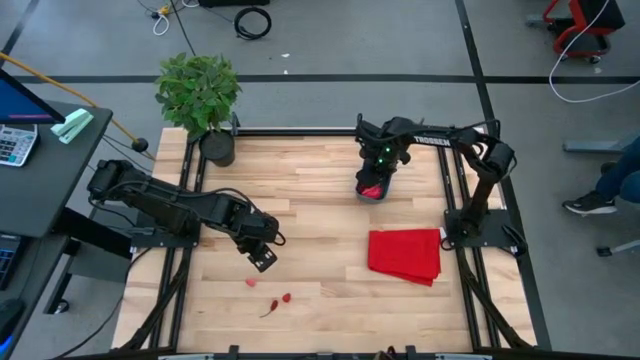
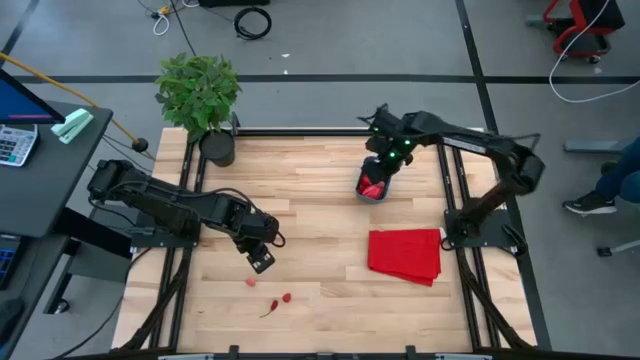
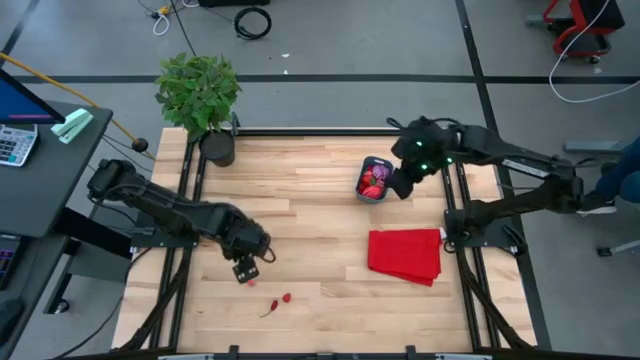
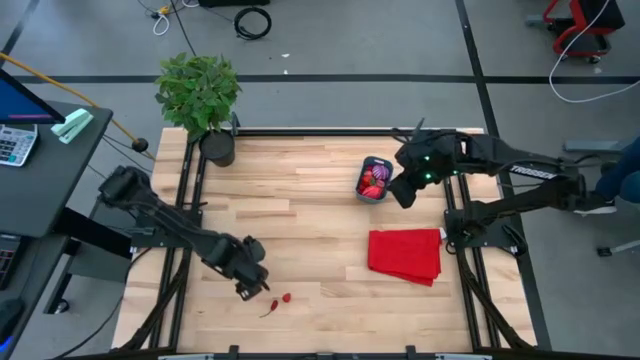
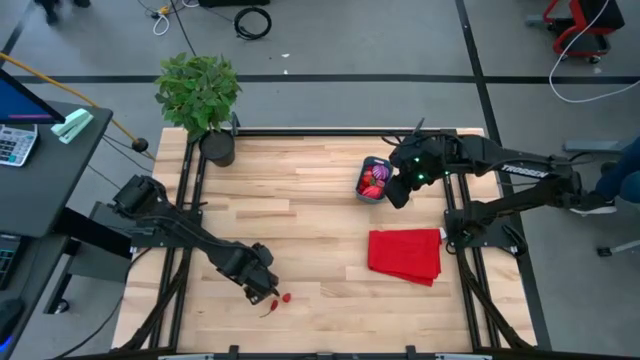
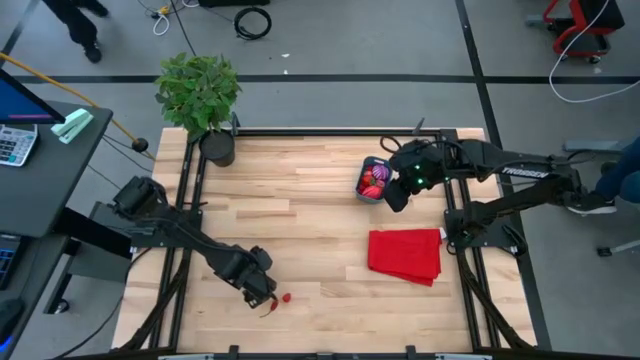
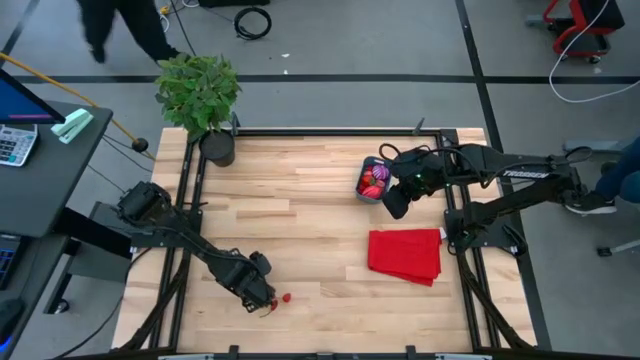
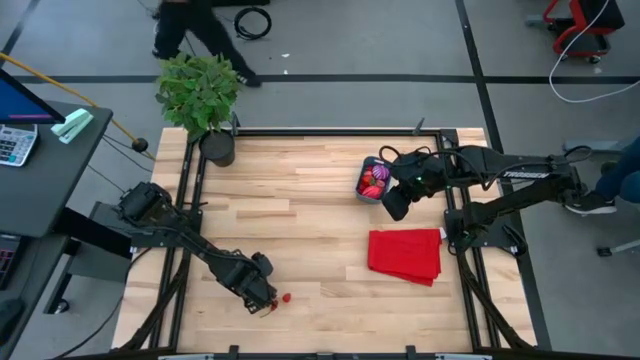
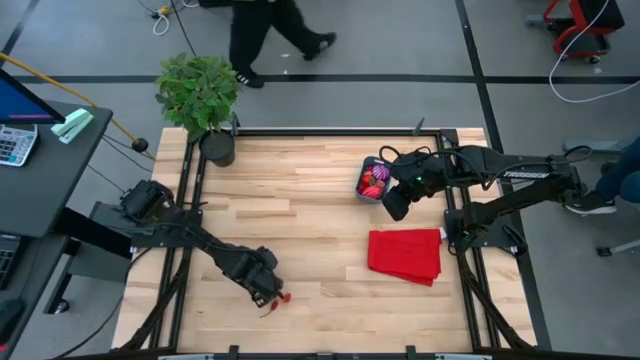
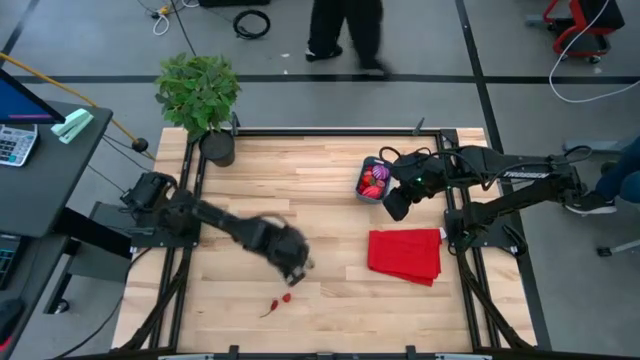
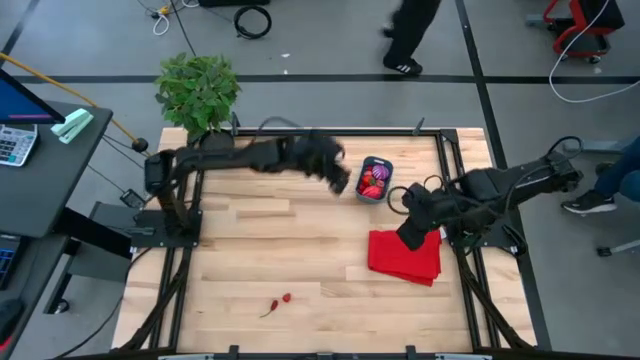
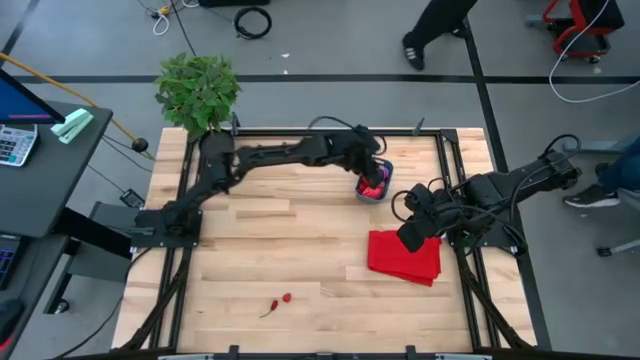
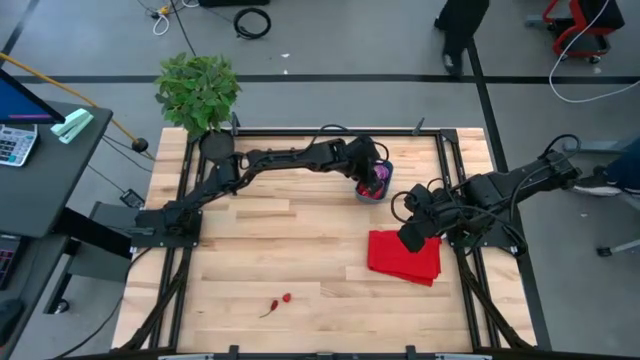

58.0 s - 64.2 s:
Task: Pick and placing Produce into tupperware
Put the peach into the bin

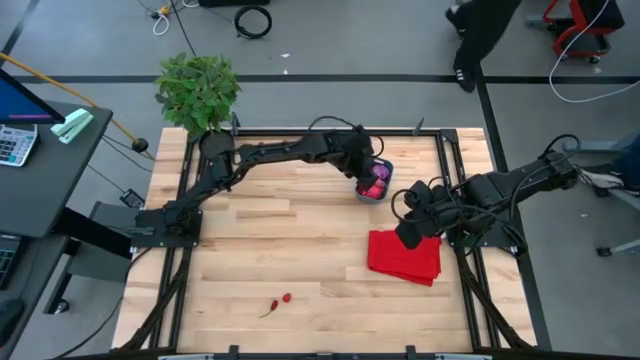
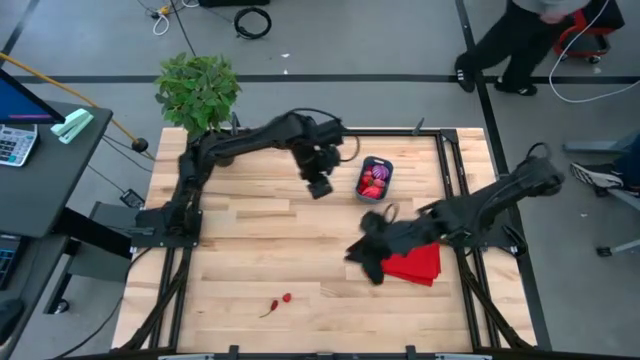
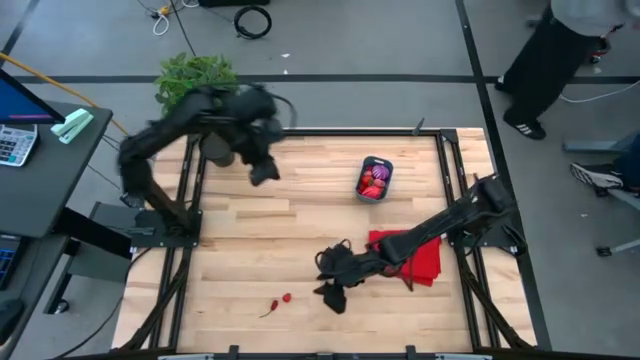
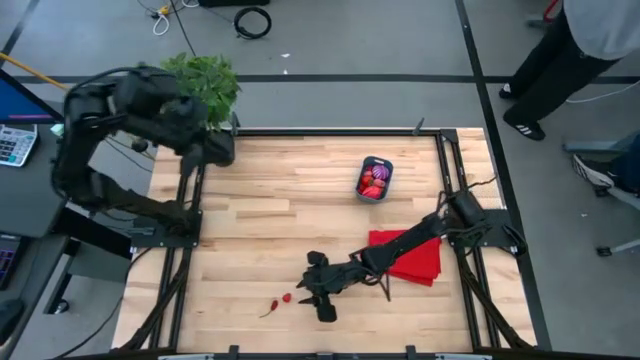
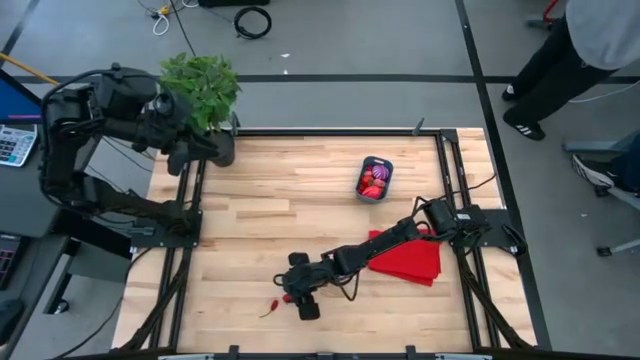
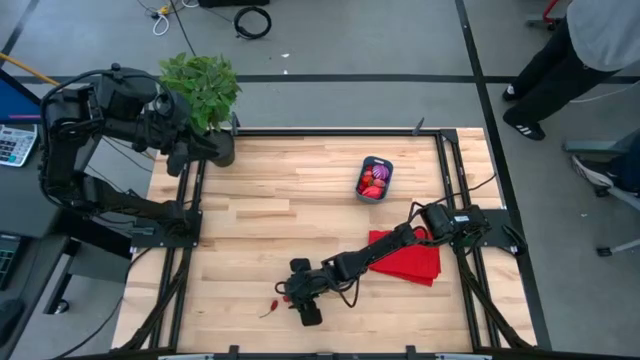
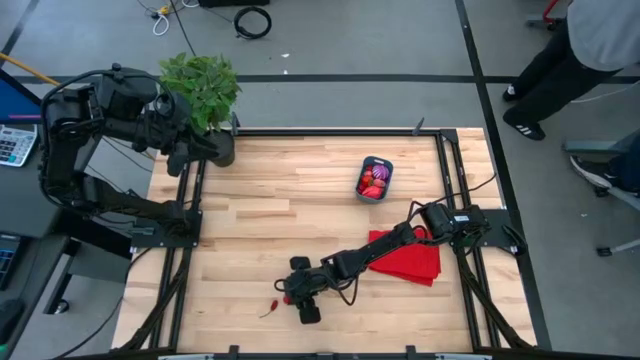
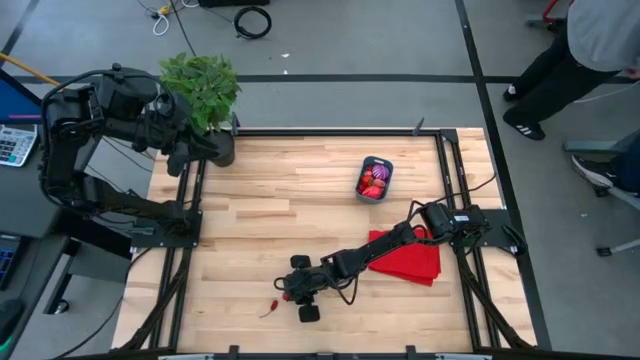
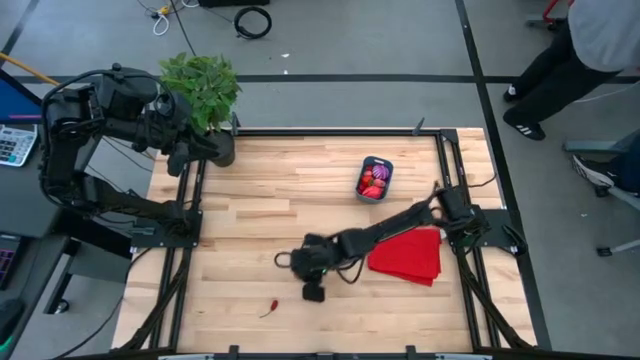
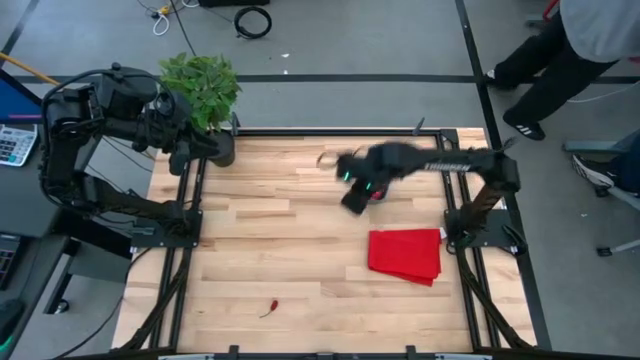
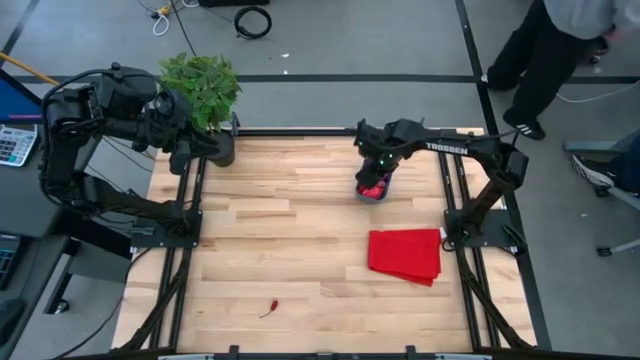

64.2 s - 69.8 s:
Put the strawberry into the bin

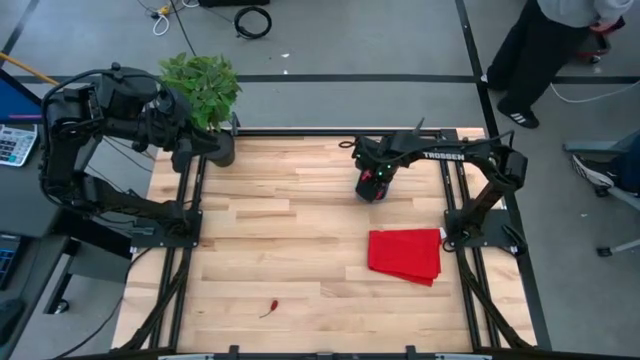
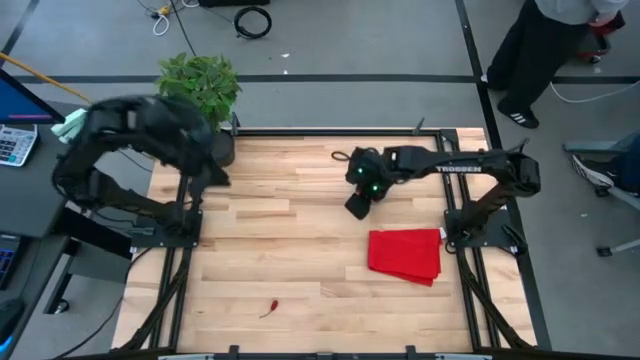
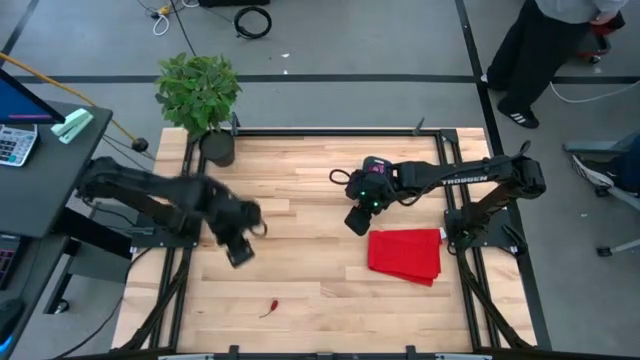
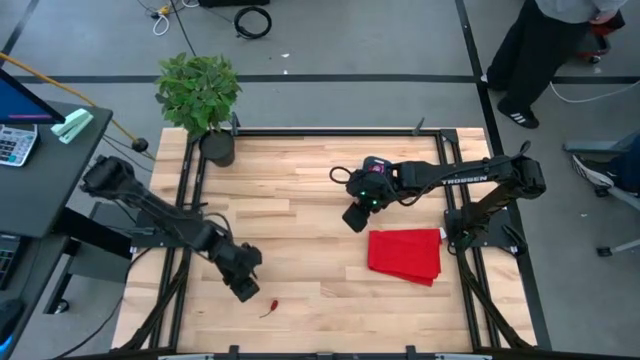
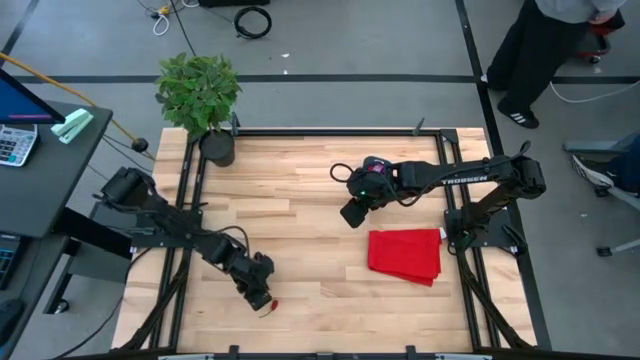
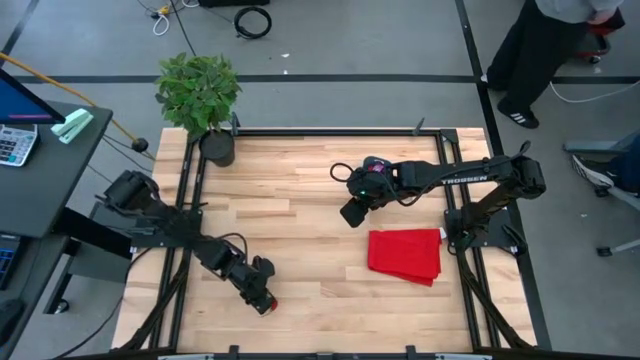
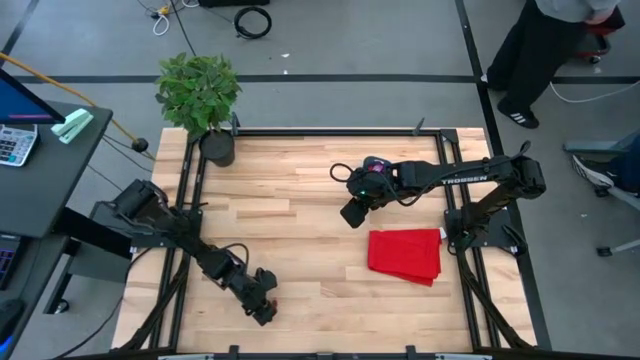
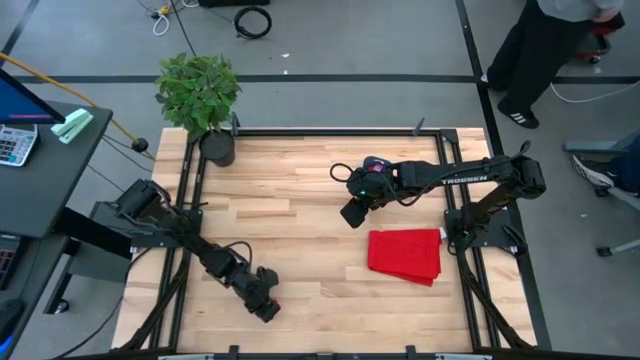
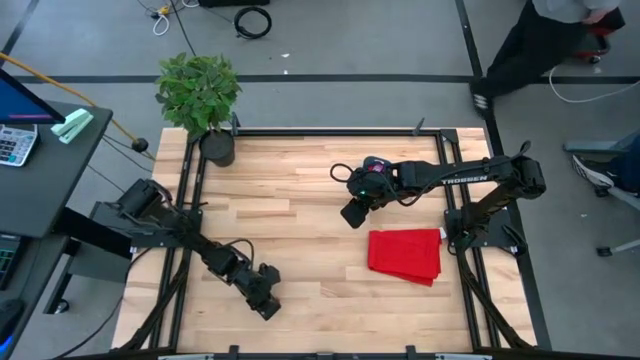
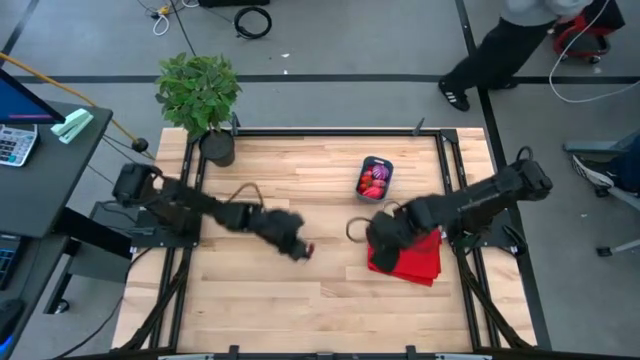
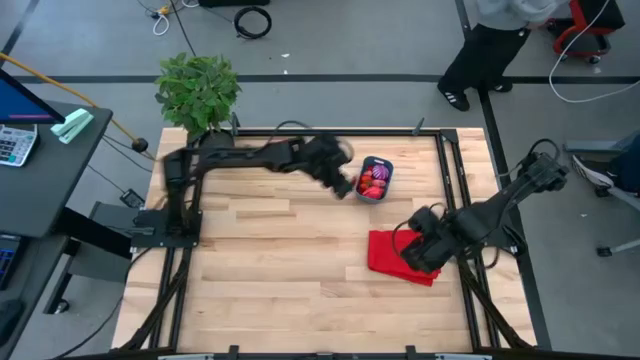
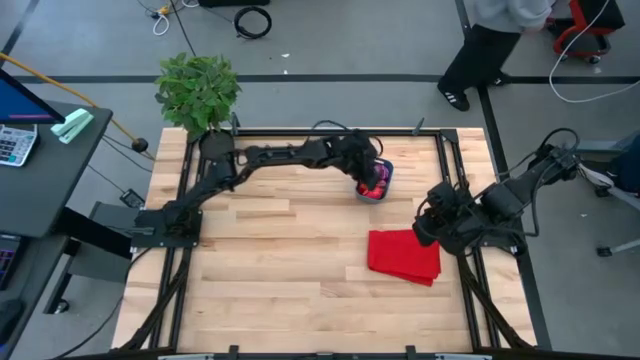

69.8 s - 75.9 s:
Put the berry into the bin

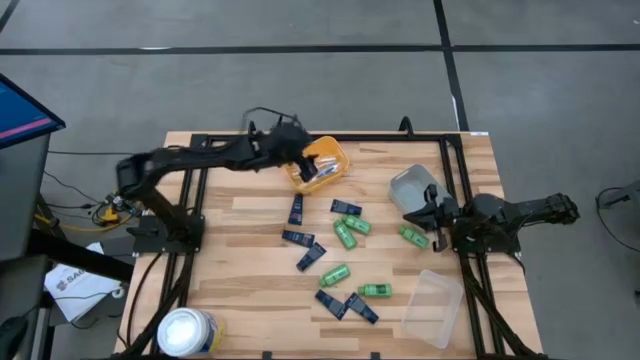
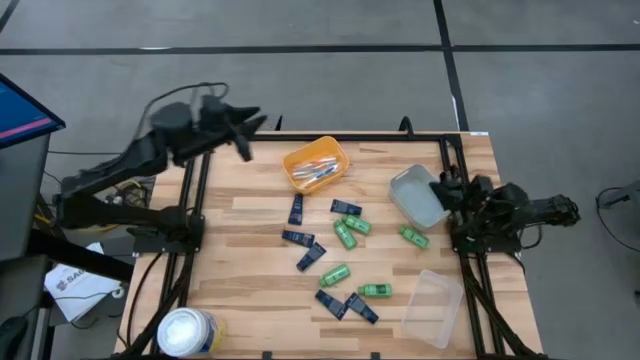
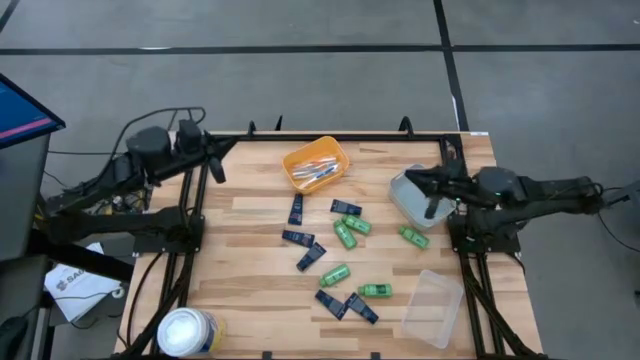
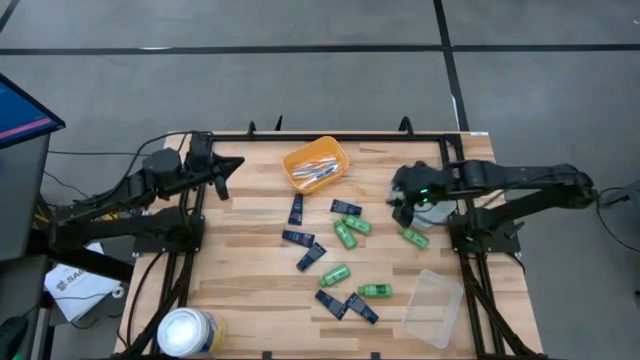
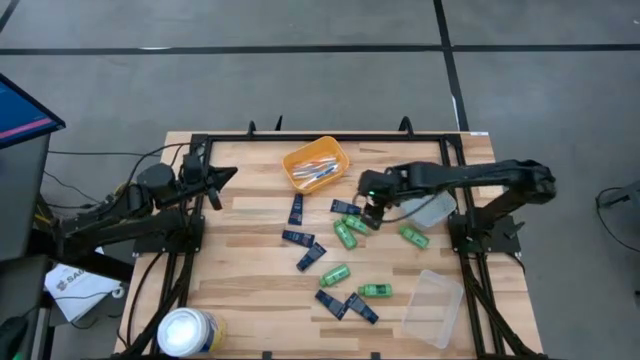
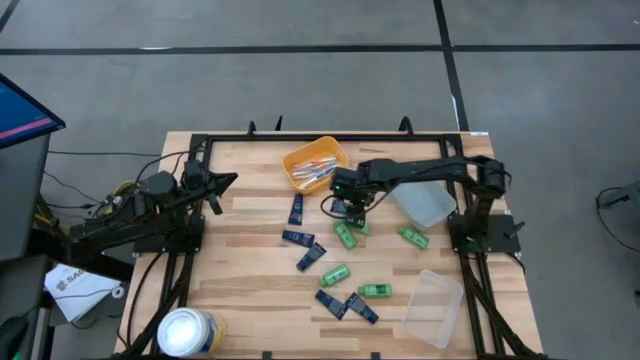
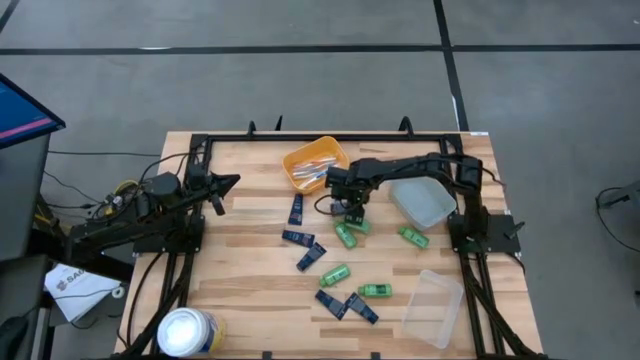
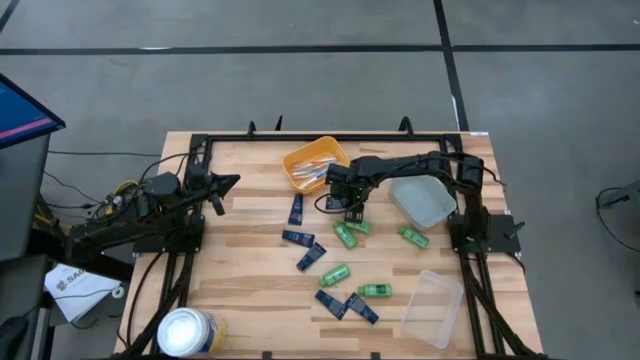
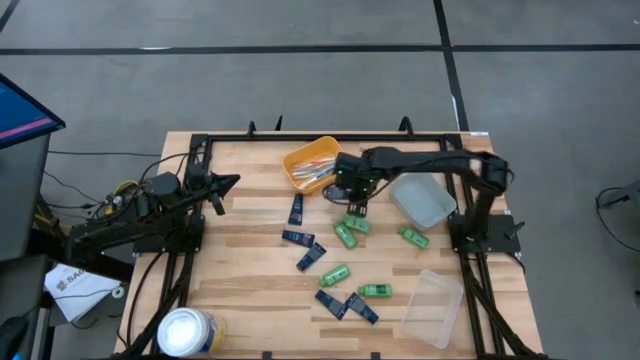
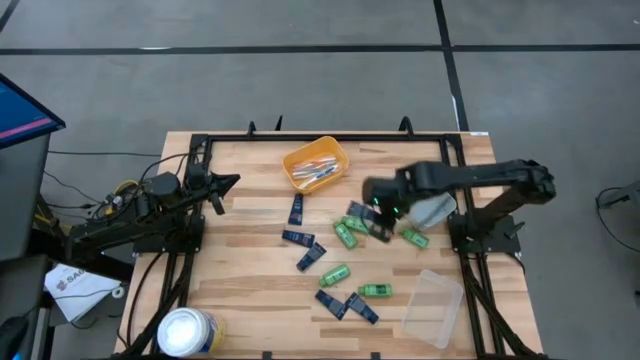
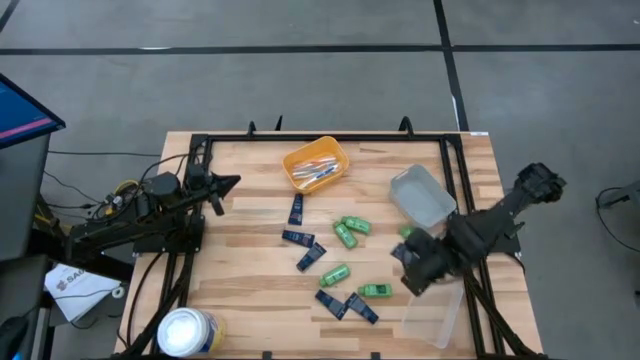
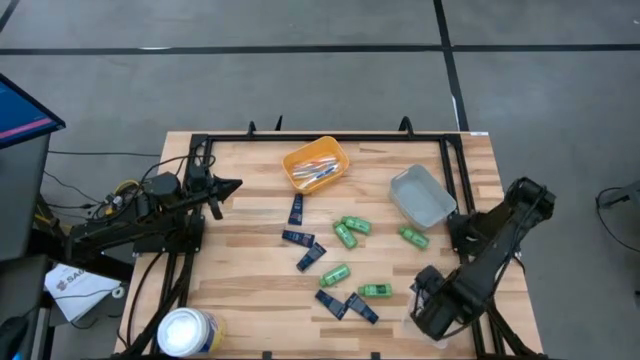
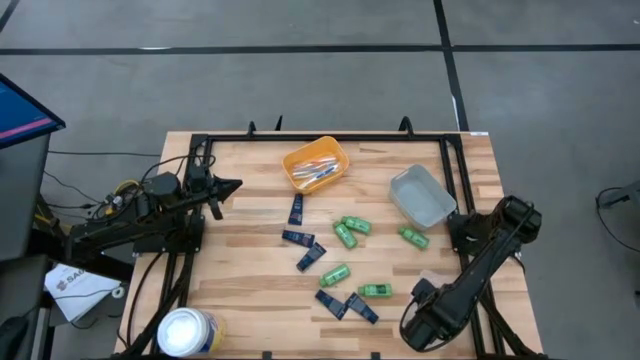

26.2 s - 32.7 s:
Task: Pick & Place Travel size toiletries
Put the dark blue shave cream into the transparent bin
